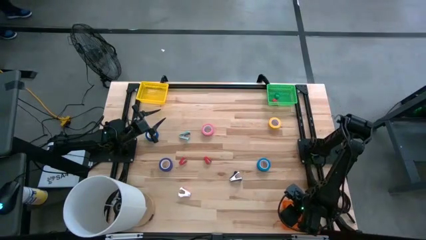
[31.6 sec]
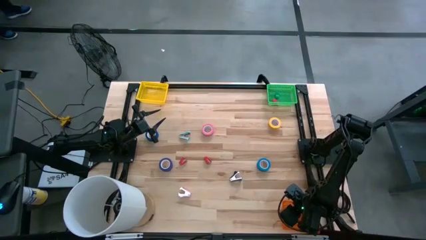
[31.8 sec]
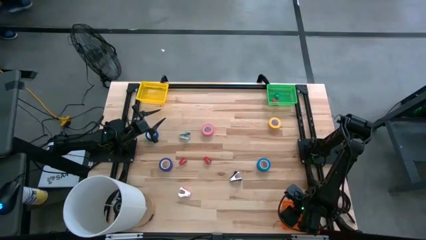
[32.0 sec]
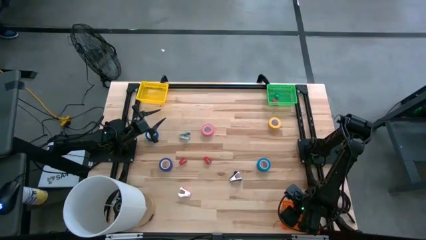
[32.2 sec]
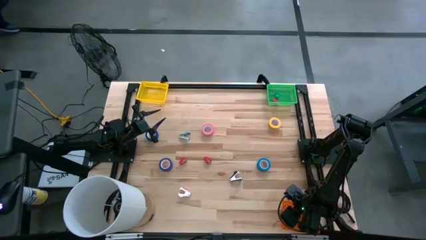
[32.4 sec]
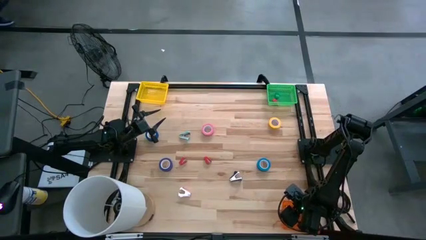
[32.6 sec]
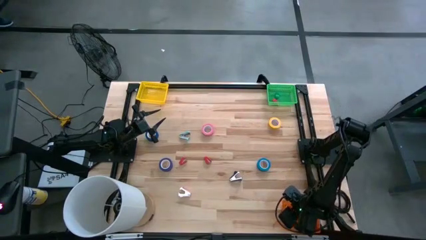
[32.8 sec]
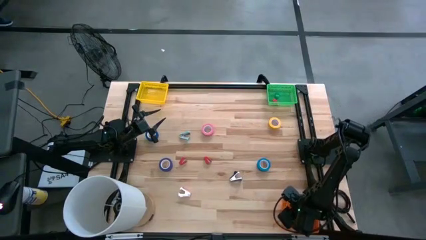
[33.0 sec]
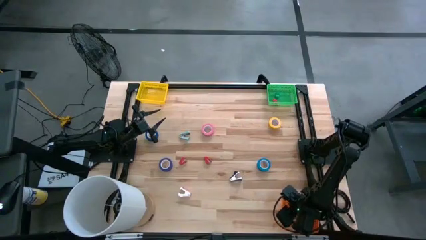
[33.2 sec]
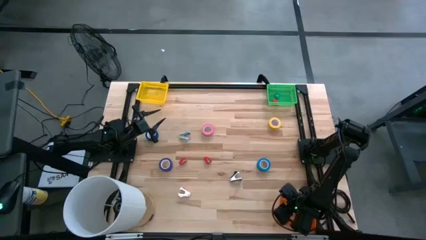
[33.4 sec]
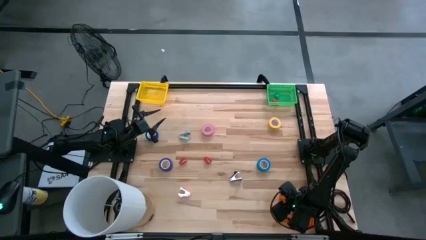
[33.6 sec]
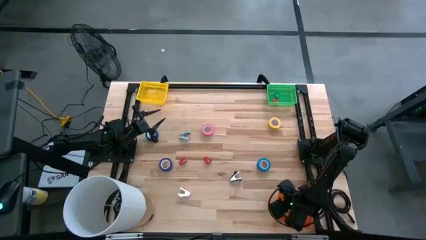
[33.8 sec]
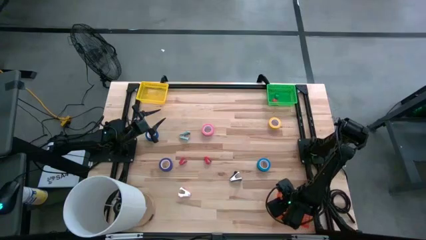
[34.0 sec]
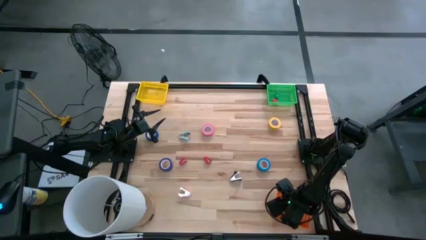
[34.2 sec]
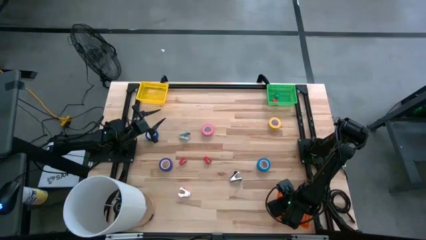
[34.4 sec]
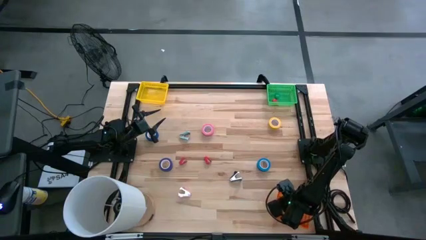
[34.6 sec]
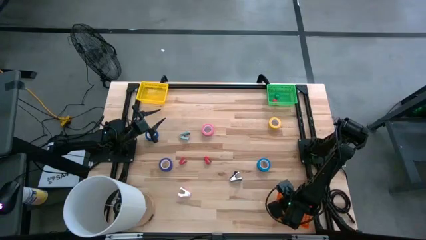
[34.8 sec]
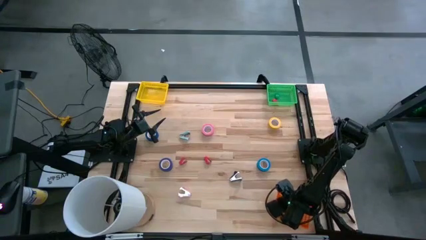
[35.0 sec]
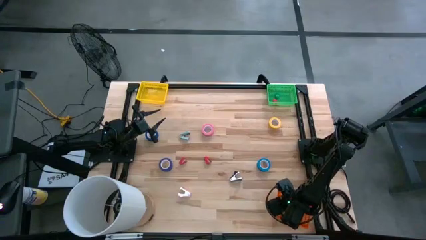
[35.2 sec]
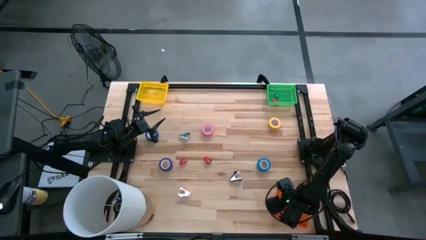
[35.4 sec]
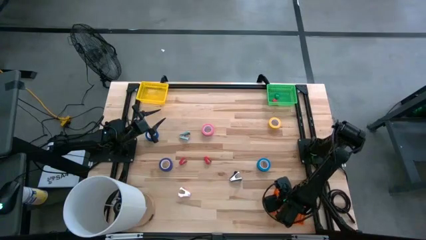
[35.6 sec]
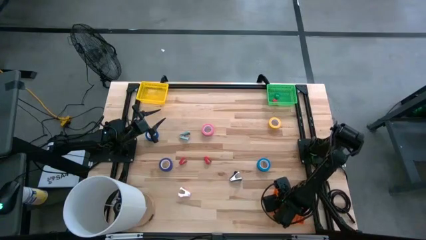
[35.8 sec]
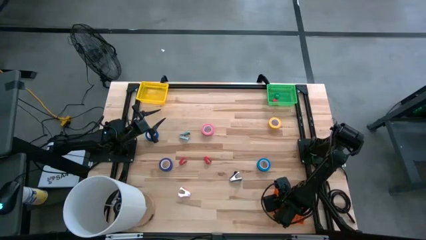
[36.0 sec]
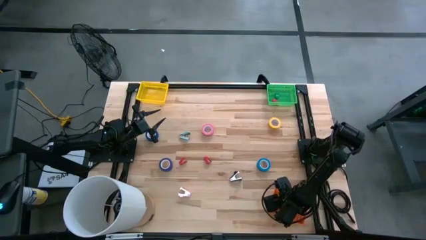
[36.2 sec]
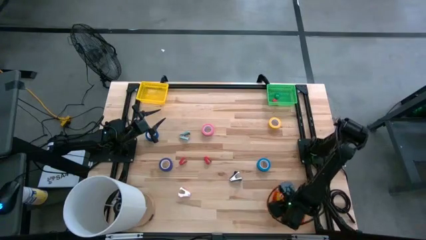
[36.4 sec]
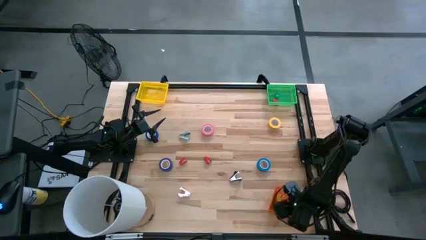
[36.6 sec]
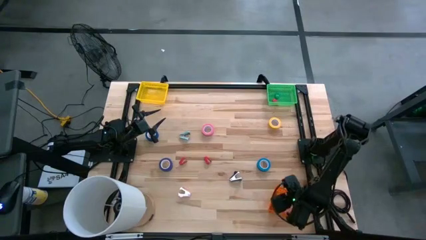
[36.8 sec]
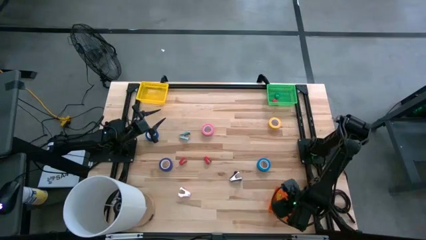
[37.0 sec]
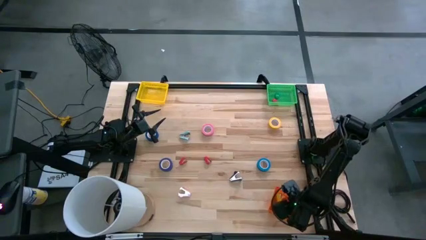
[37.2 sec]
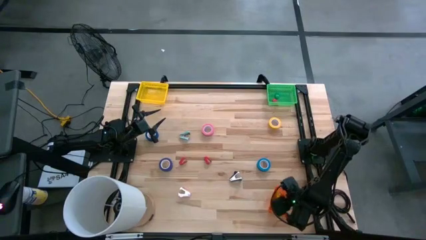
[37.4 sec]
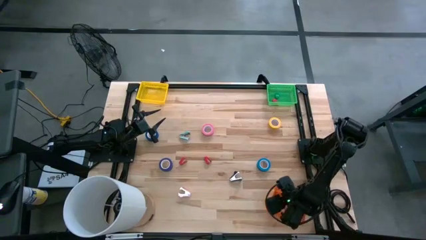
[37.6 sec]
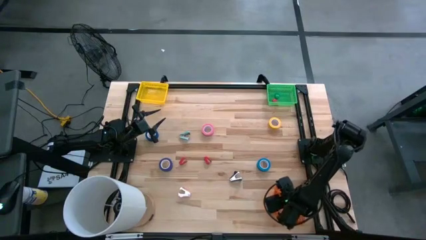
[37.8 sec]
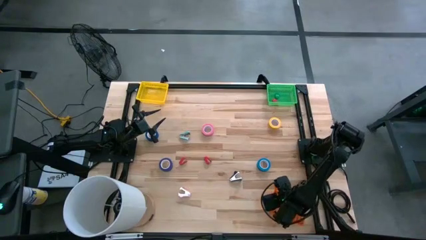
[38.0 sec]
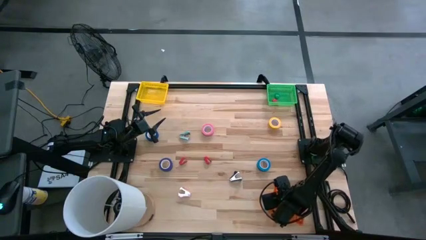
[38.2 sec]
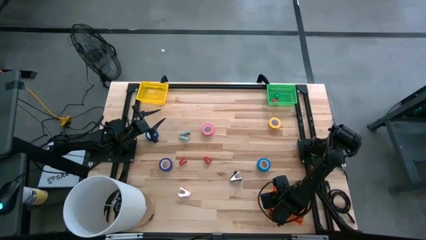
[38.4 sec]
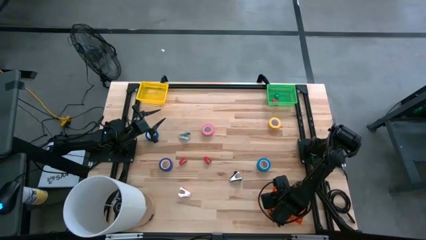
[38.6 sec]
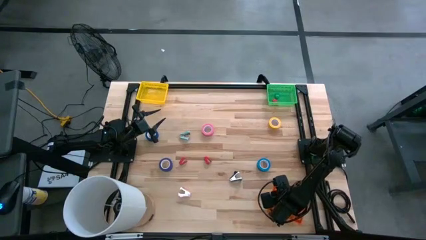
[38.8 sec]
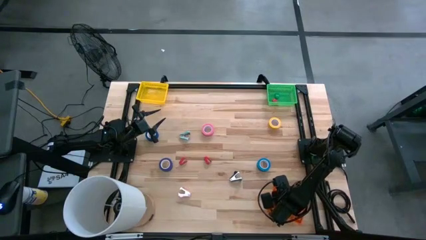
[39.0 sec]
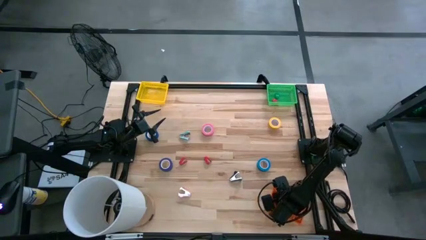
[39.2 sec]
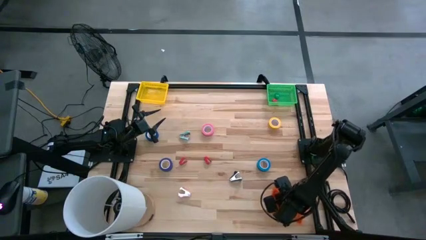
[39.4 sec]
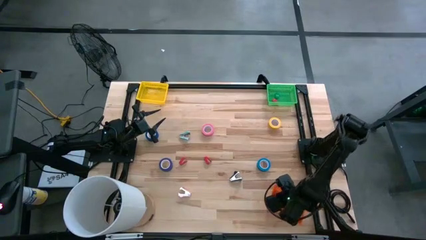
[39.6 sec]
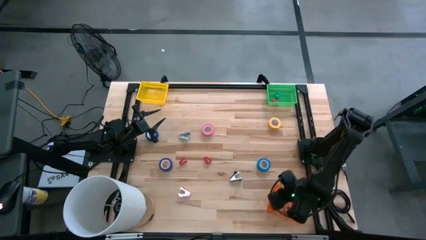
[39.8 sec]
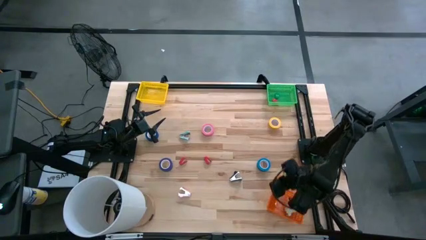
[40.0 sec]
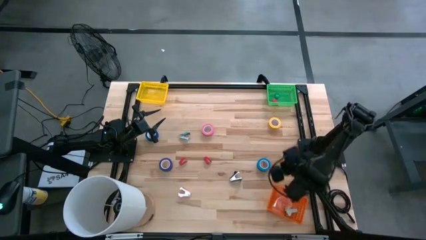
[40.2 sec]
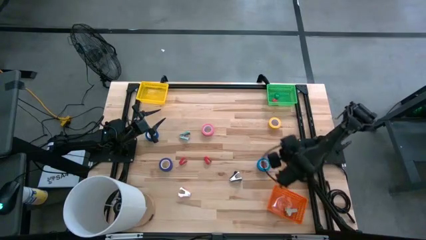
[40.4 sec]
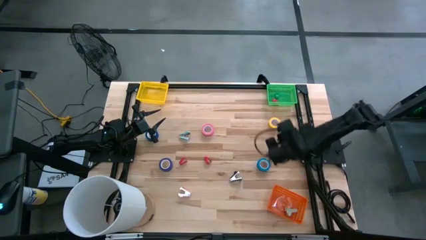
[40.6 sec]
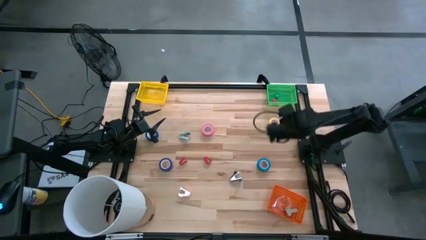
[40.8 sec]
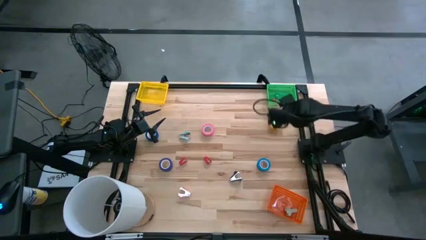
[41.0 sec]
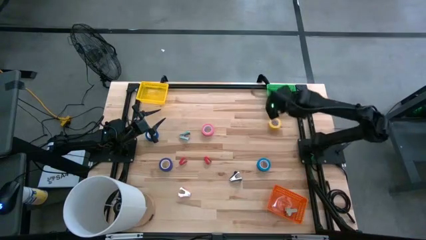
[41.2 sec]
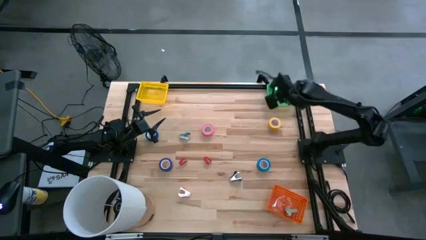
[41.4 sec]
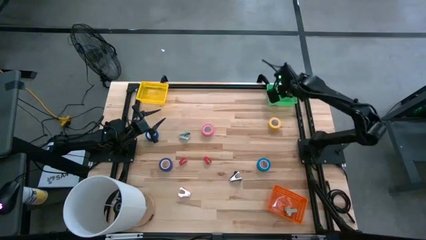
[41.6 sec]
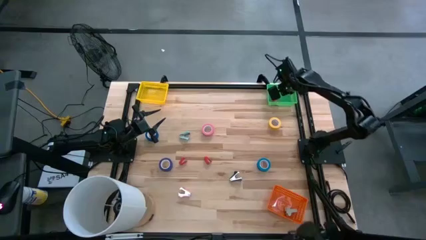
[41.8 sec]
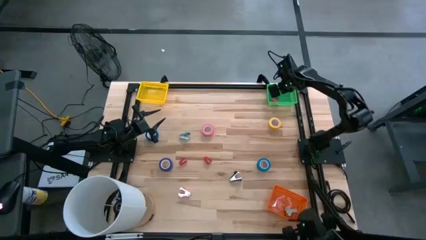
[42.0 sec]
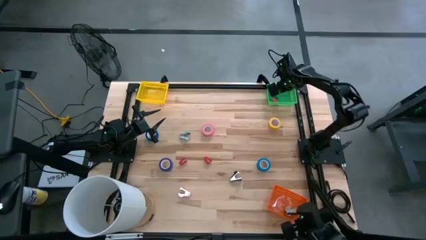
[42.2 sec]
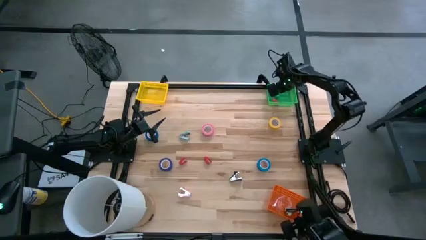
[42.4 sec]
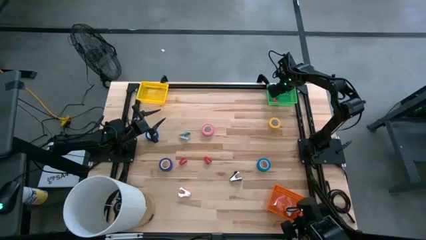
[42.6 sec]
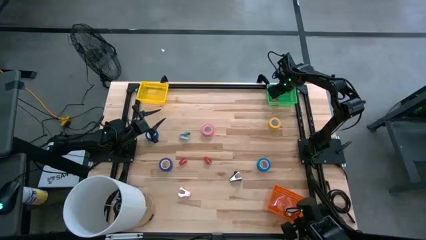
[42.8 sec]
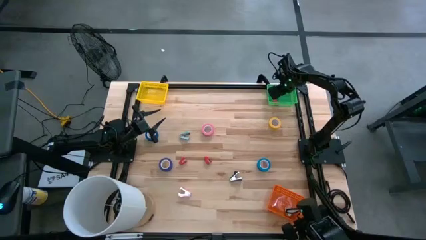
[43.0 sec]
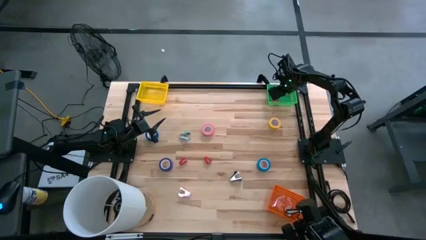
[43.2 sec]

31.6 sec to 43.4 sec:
Task: Pick and place Stapler, Stapler remover, tape
Put the yellow stapler into the green bin

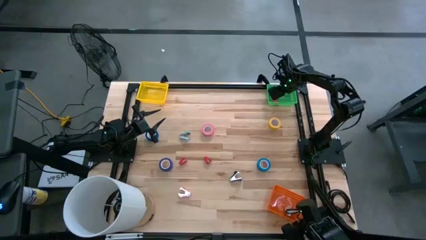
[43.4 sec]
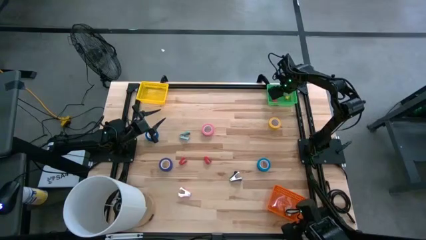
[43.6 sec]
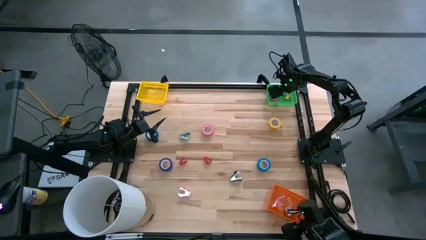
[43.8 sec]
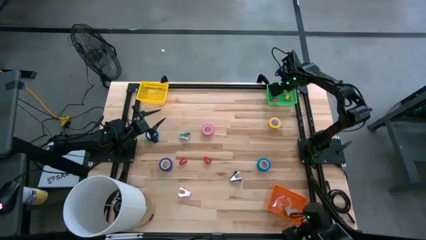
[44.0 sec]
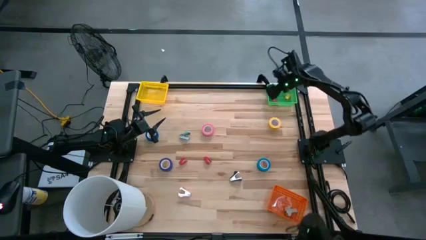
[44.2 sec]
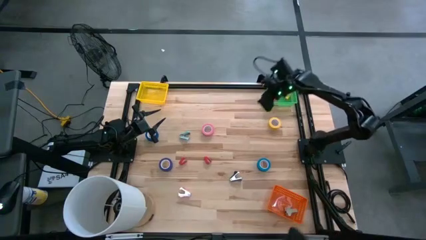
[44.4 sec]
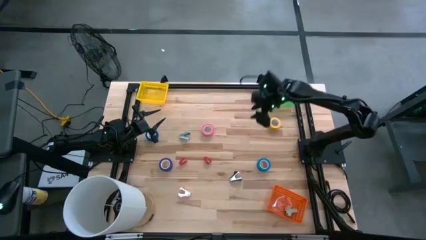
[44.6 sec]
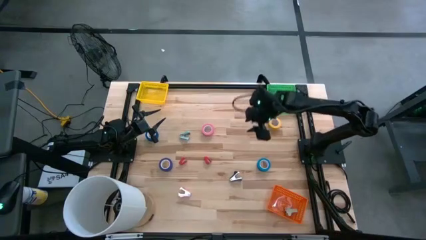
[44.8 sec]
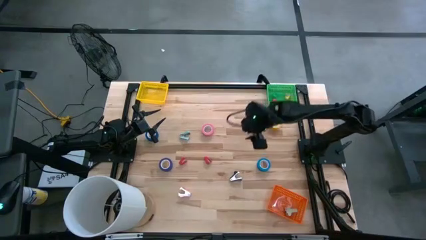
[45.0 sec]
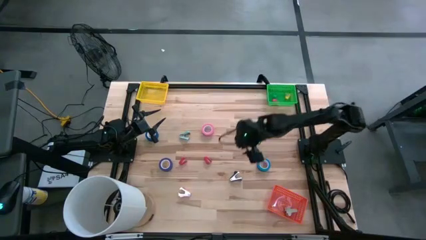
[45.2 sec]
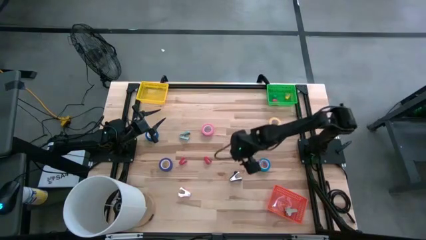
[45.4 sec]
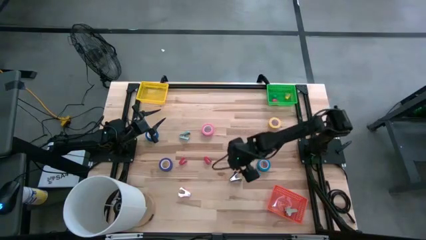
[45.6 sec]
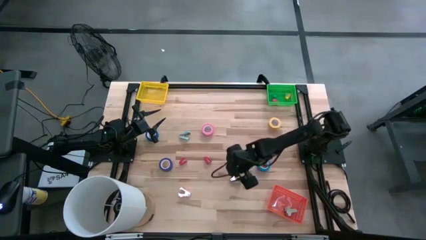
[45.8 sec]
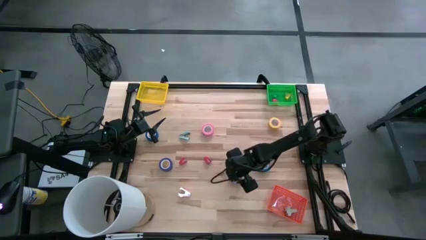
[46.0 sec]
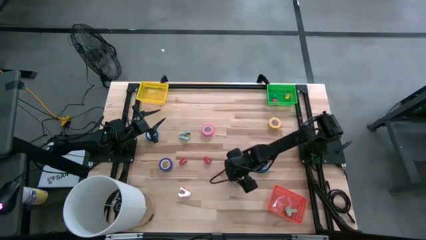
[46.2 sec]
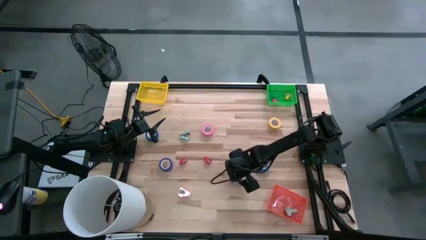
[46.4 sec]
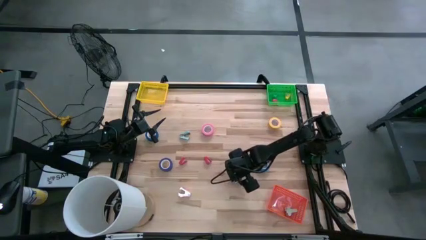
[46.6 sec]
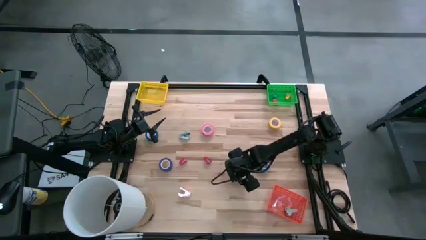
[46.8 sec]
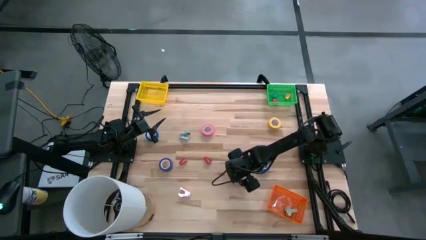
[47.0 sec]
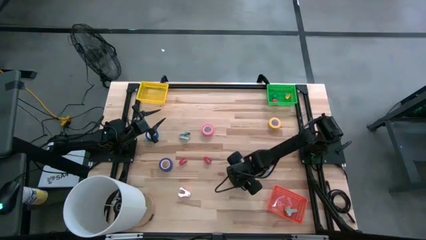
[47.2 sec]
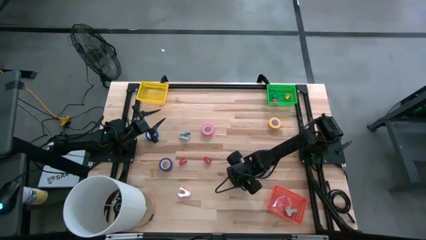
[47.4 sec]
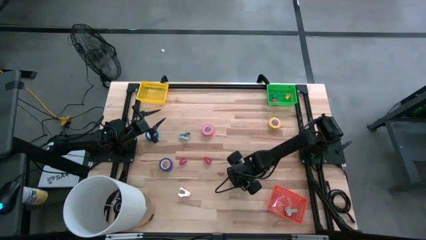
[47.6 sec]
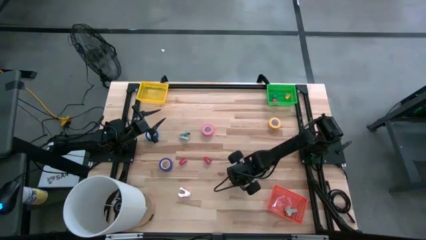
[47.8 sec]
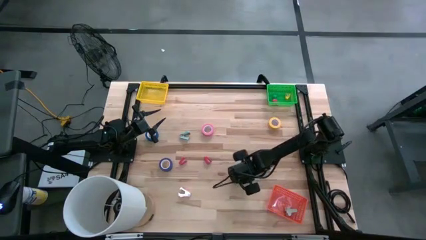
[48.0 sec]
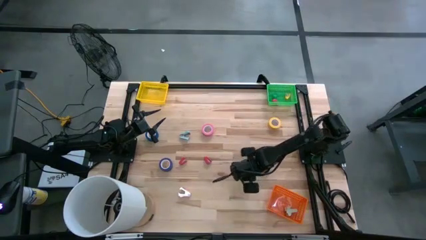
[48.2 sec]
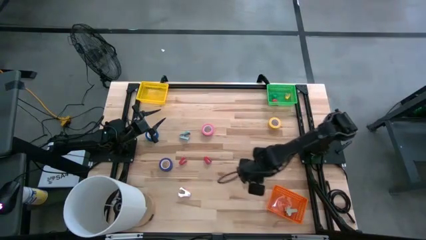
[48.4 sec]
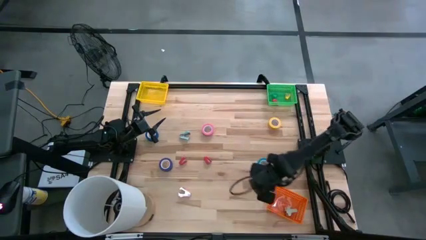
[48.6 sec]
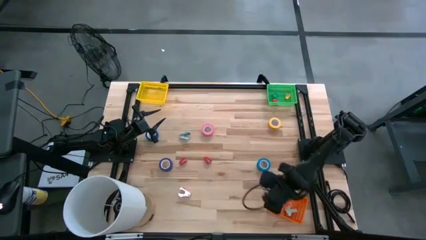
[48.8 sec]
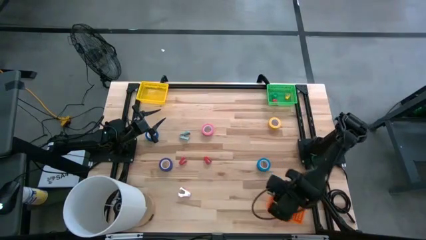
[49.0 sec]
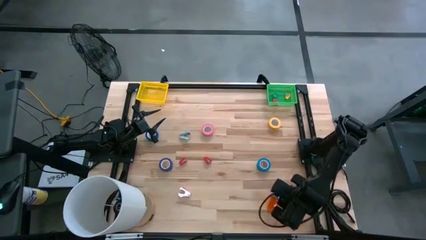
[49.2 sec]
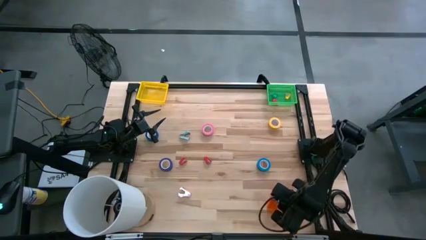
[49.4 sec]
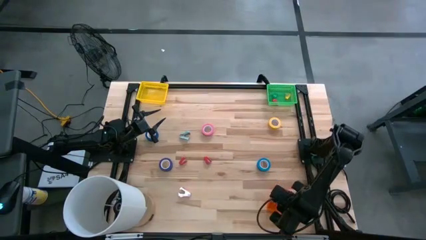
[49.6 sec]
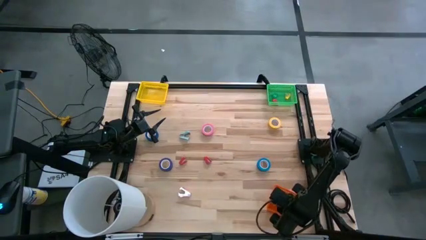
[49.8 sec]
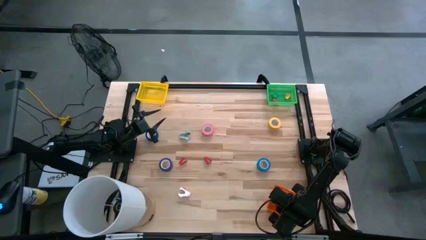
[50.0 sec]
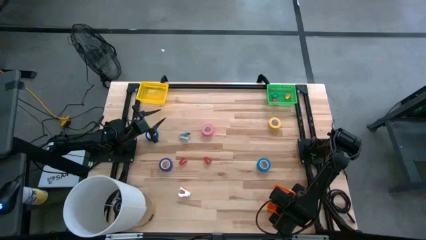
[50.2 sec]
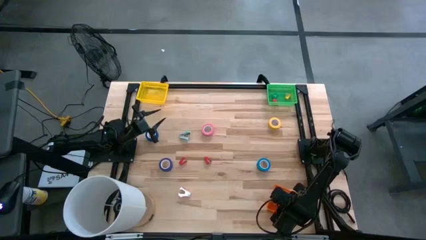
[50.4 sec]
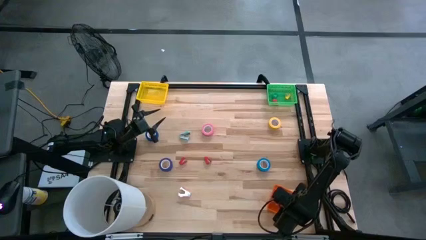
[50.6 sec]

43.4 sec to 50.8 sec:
Put the black staple remover into the orange bin
